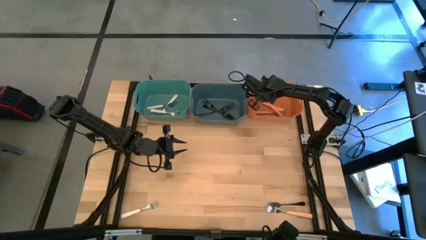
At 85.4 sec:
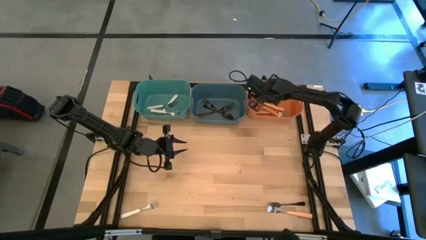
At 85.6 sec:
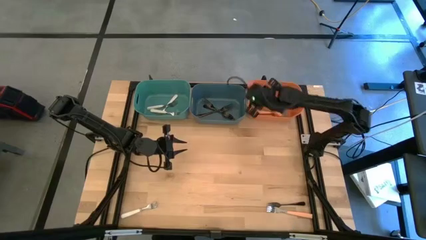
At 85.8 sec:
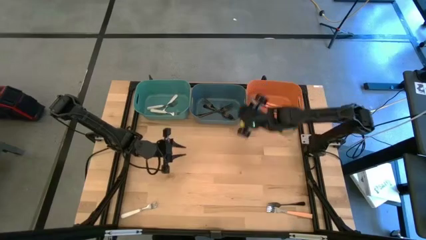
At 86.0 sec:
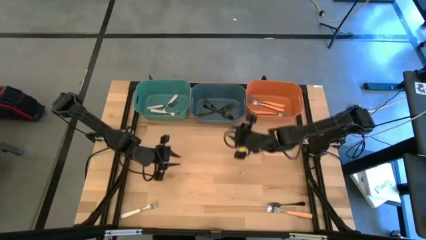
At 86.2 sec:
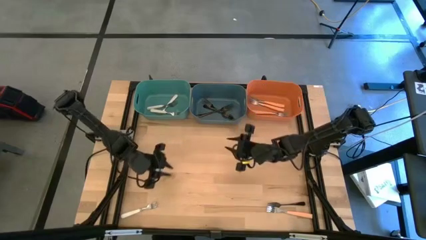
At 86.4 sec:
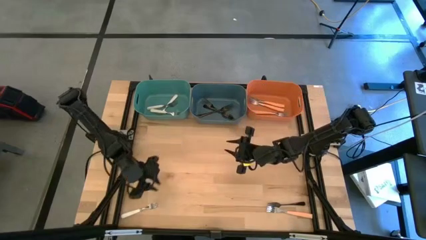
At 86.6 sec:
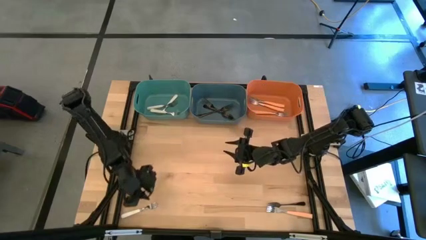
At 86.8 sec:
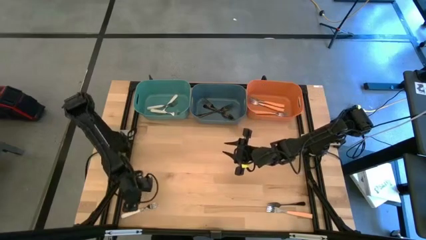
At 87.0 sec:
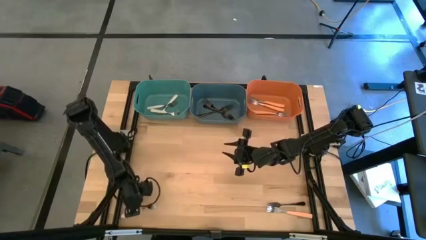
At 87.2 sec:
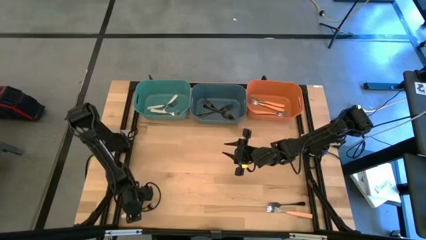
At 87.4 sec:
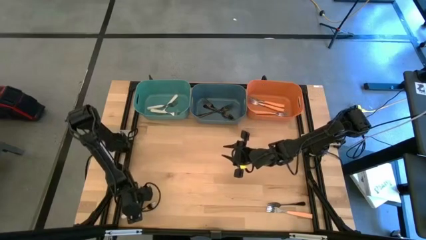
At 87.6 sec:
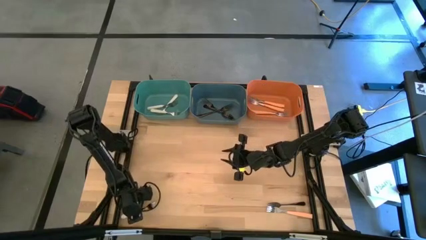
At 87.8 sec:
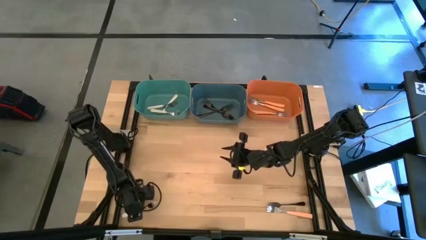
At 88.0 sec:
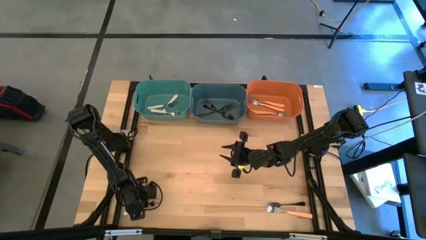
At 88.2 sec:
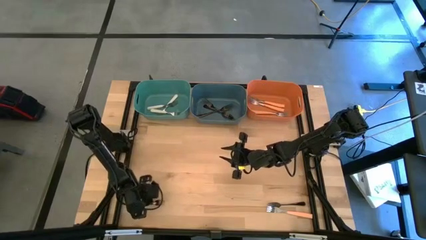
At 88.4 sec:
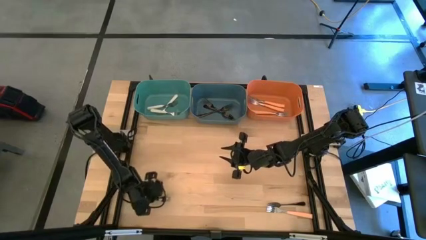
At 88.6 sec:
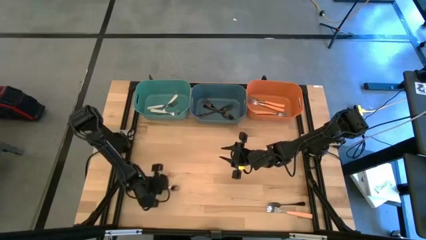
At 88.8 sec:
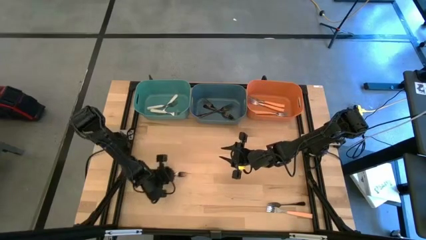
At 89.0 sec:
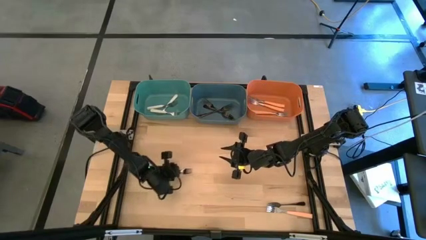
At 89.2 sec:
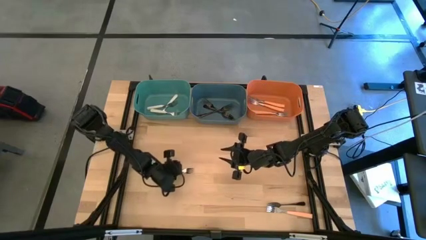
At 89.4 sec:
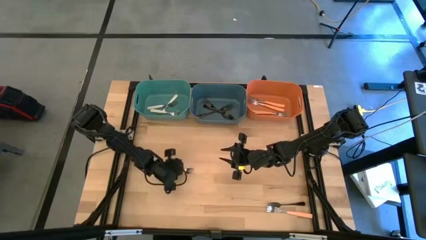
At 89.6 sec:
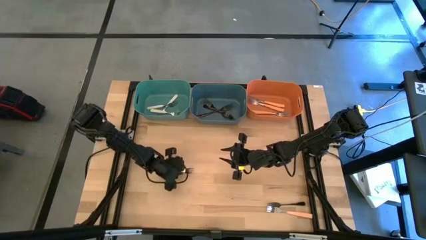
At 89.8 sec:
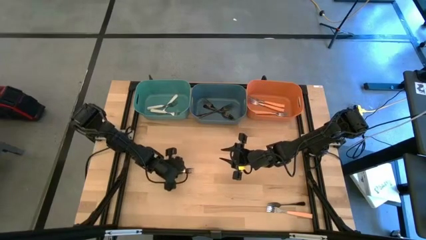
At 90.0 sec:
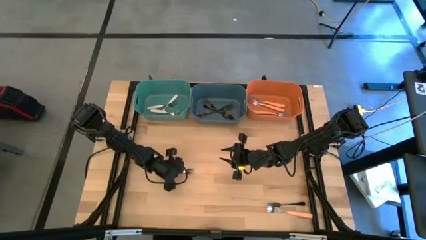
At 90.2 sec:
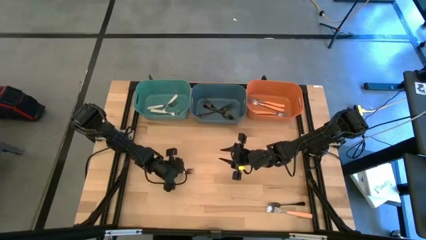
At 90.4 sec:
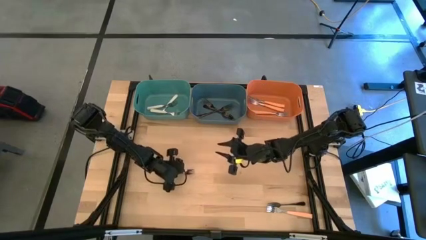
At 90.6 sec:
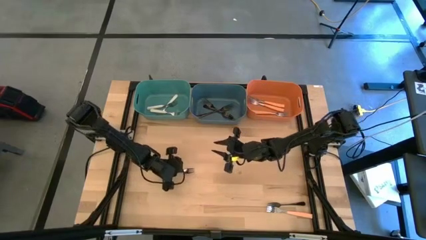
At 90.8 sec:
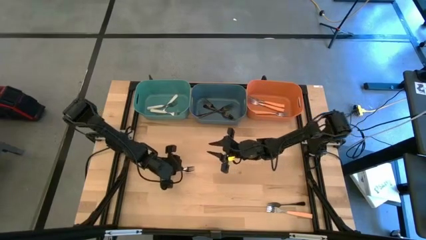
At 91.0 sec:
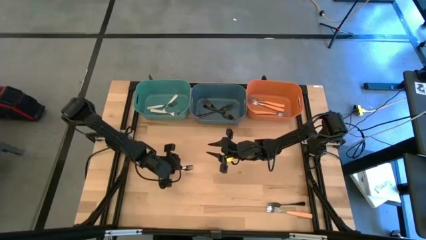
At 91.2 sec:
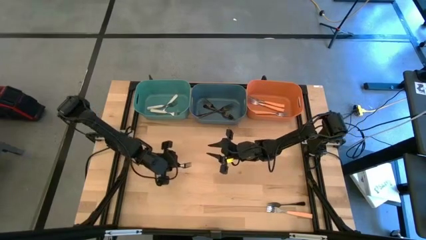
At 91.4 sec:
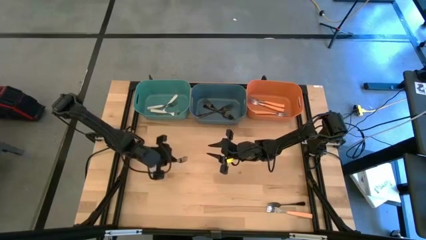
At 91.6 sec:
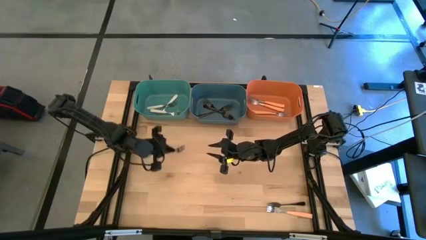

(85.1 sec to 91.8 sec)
Task: Sort silverware by color (type)
Put the white fork into the green bin

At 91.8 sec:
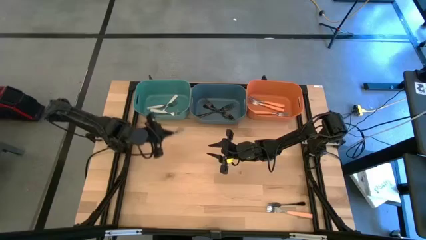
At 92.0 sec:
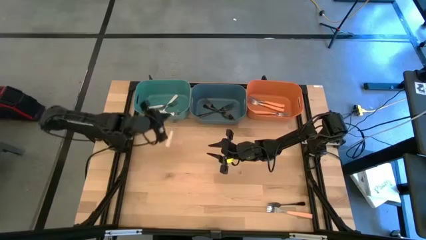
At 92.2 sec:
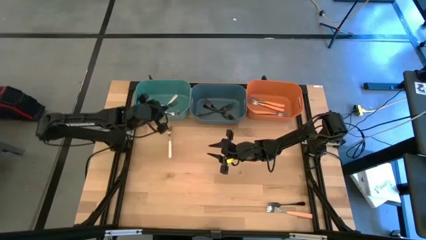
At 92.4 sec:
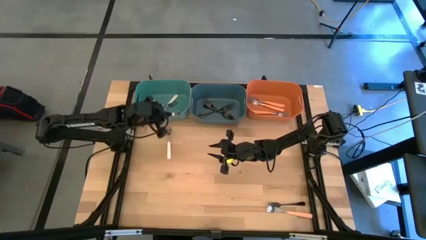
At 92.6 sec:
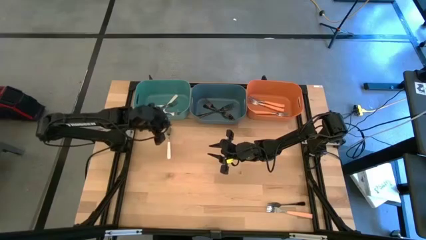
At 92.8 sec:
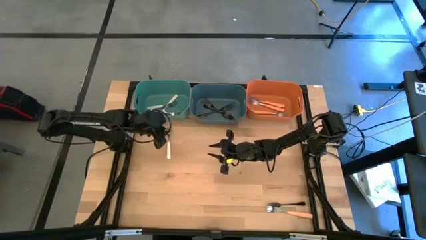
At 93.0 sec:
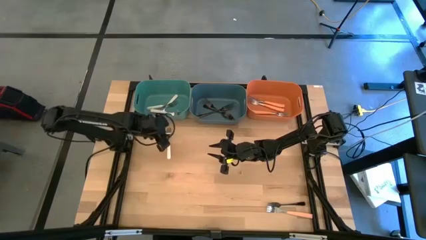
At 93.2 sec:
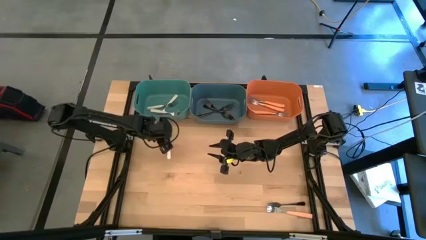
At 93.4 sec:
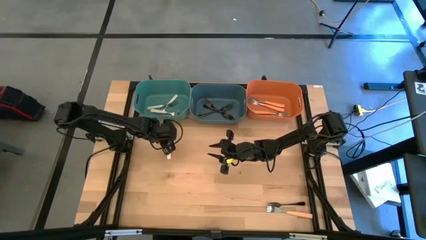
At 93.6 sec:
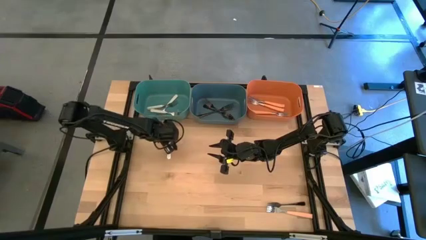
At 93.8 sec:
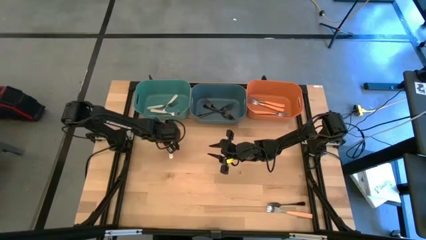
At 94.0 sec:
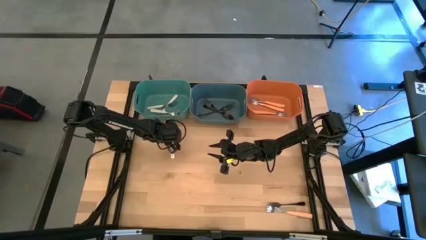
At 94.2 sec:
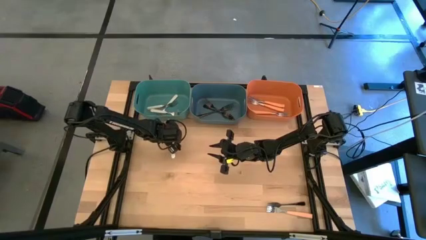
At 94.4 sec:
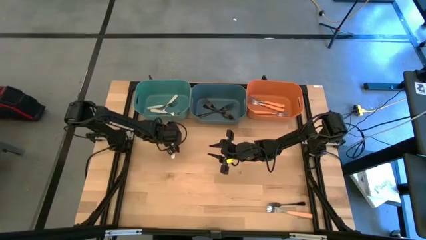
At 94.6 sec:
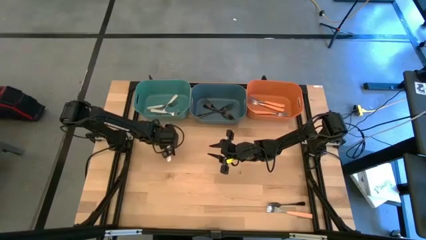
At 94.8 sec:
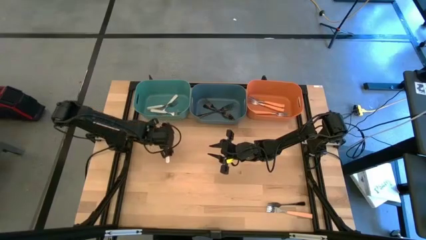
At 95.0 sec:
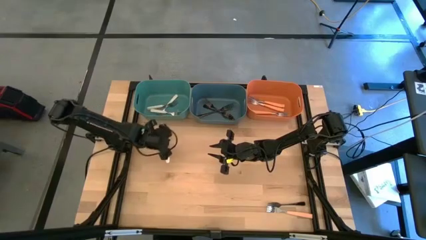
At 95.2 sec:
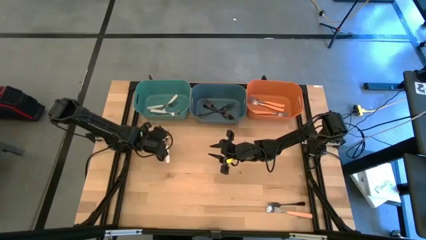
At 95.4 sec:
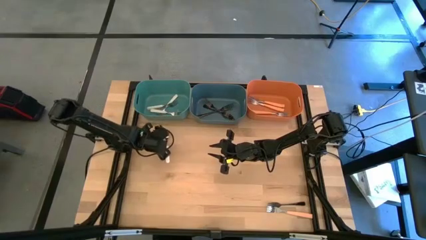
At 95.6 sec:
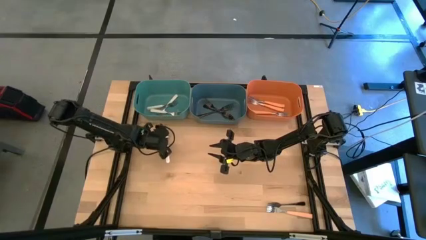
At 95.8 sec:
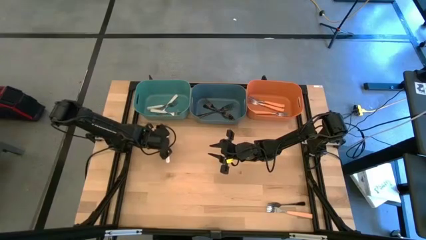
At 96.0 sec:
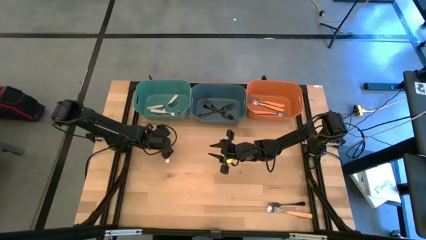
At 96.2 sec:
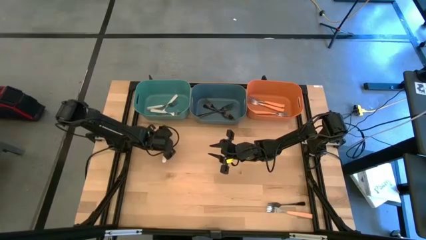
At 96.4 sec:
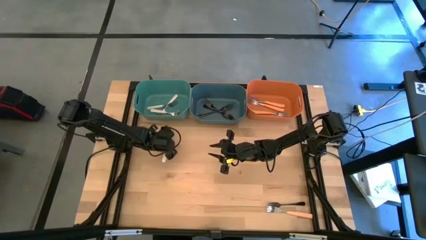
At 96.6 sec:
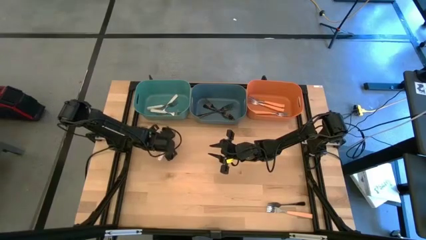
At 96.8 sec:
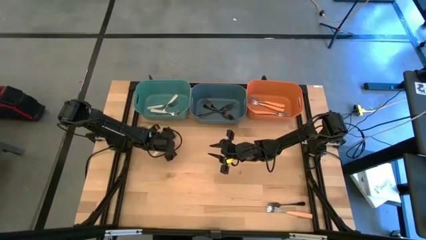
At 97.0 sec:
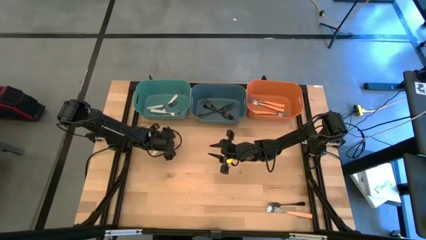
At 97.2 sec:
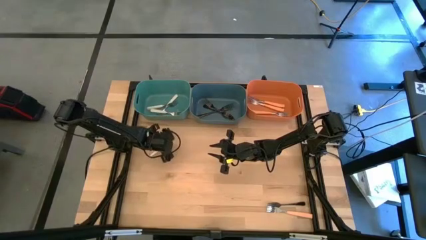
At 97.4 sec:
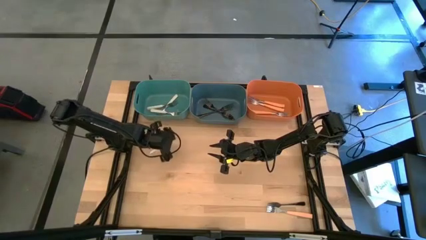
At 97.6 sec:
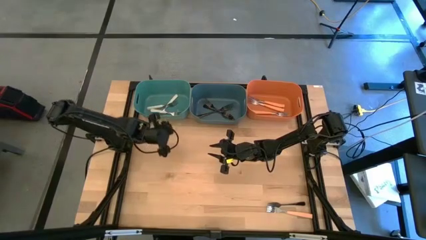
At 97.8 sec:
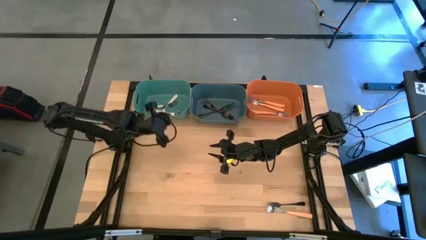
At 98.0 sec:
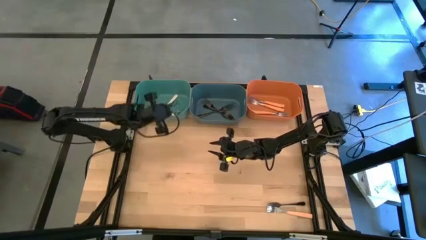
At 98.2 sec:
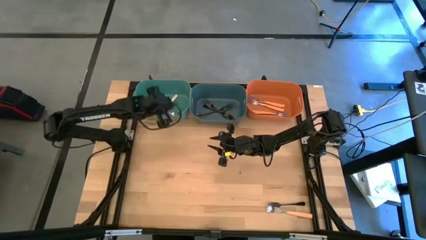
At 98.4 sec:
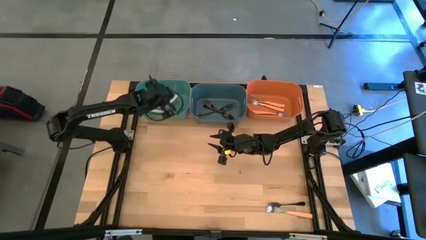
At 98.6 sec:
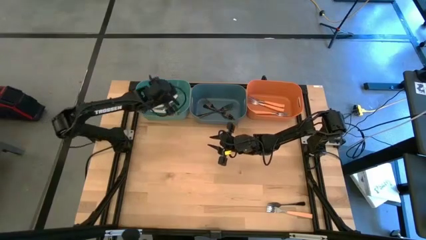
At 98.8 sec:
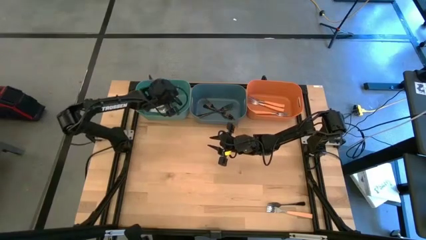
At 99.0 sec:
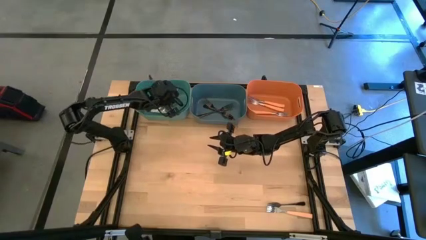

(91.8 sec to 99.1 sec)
Put the white fork into the green bin
